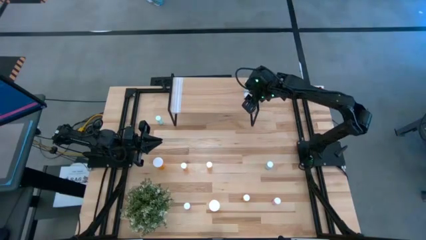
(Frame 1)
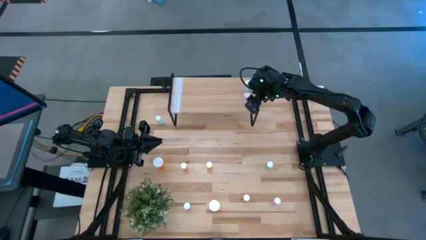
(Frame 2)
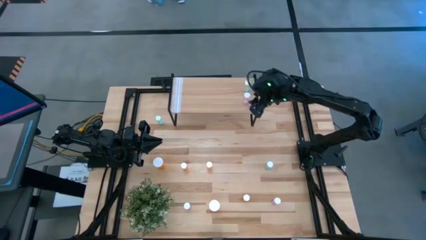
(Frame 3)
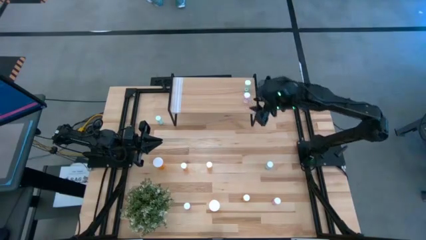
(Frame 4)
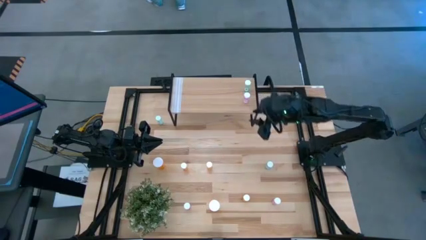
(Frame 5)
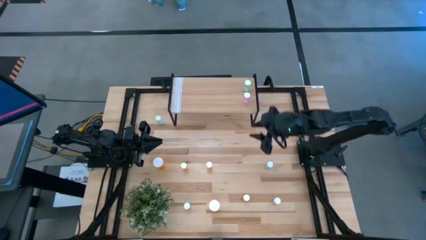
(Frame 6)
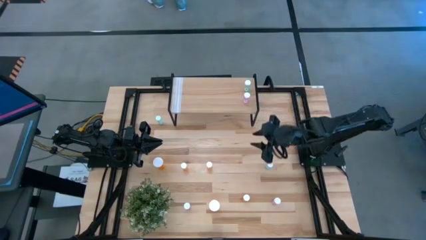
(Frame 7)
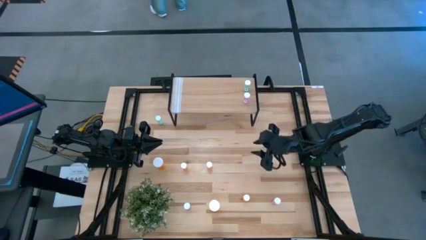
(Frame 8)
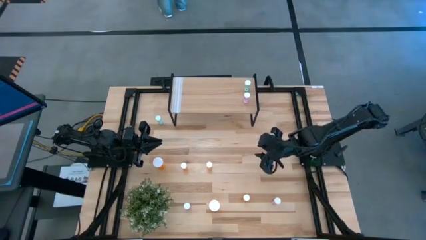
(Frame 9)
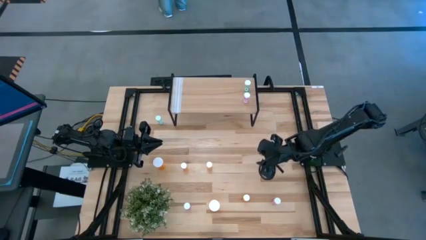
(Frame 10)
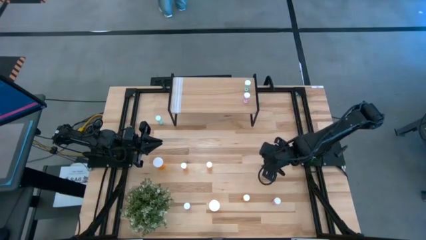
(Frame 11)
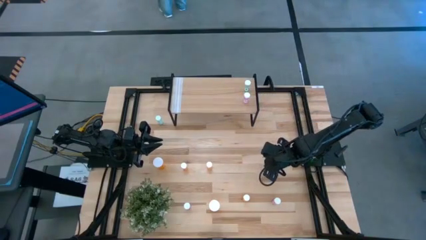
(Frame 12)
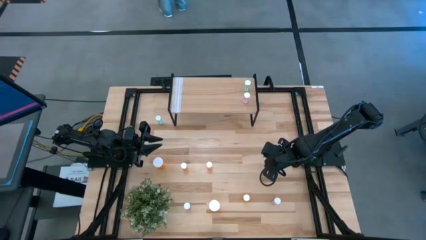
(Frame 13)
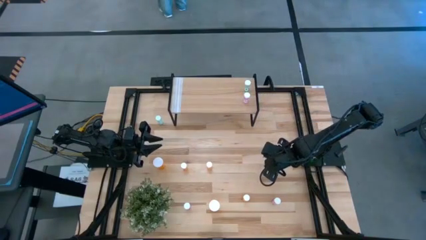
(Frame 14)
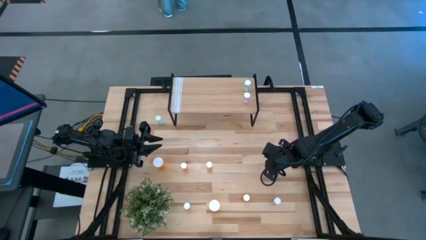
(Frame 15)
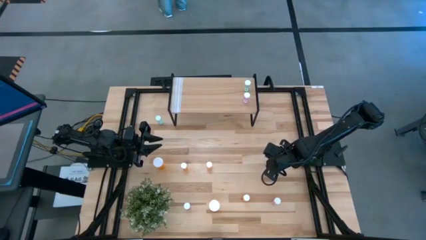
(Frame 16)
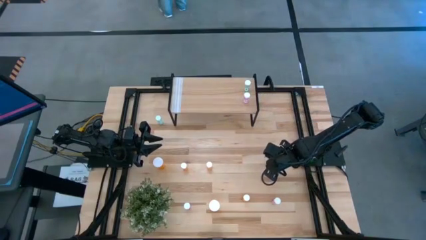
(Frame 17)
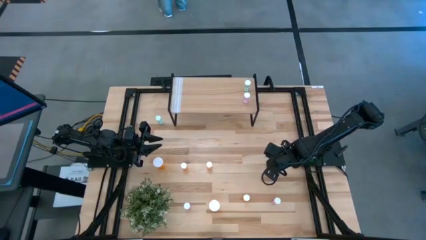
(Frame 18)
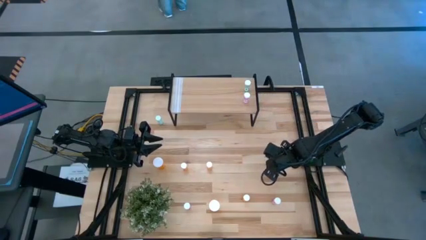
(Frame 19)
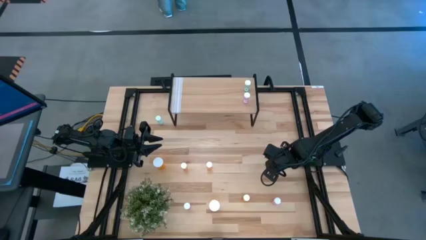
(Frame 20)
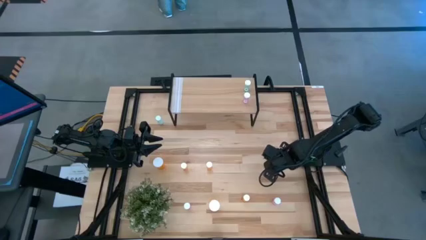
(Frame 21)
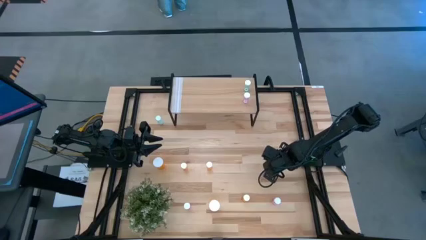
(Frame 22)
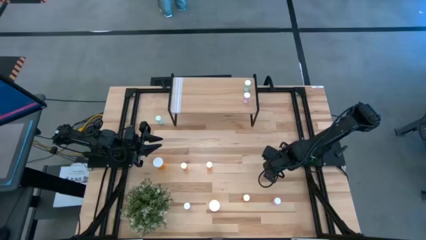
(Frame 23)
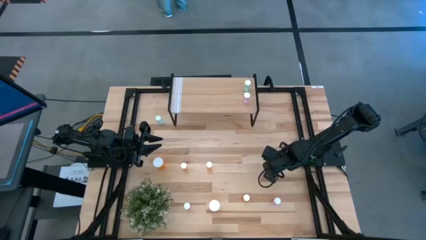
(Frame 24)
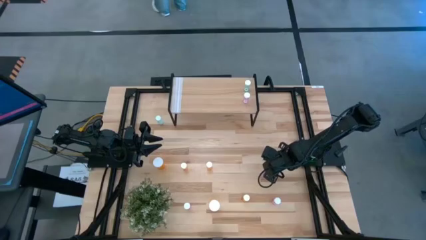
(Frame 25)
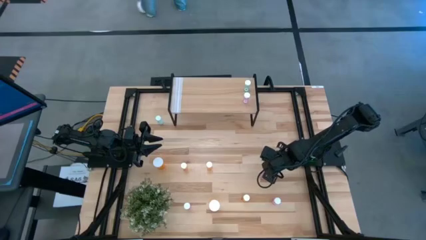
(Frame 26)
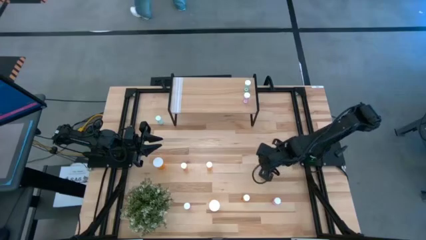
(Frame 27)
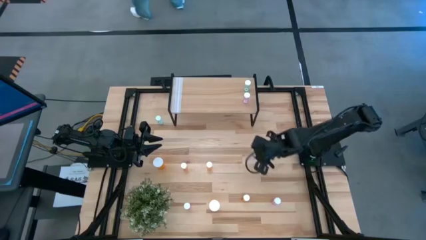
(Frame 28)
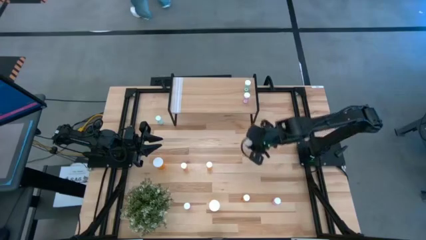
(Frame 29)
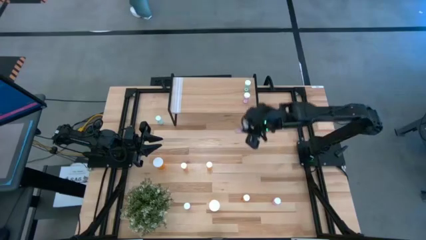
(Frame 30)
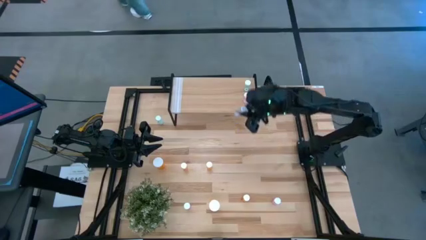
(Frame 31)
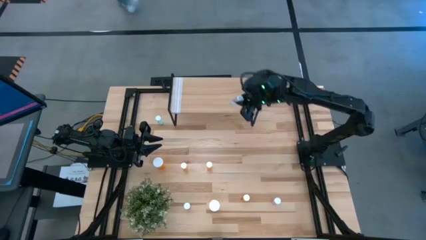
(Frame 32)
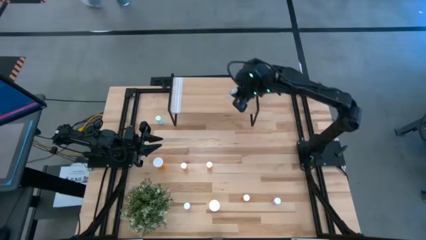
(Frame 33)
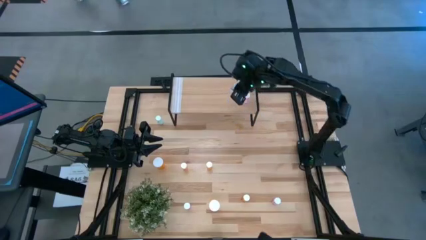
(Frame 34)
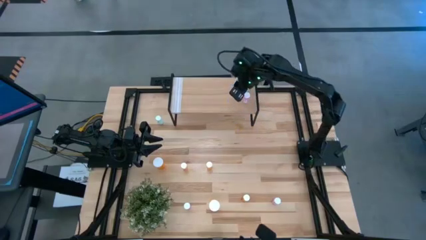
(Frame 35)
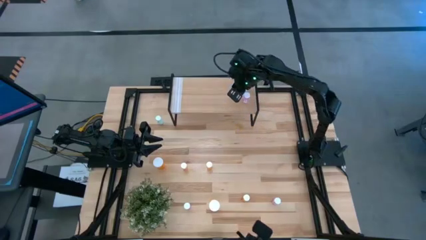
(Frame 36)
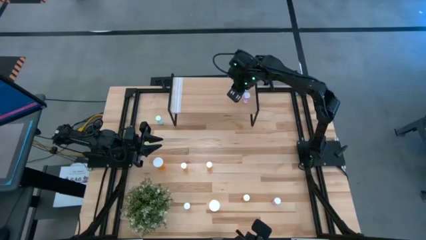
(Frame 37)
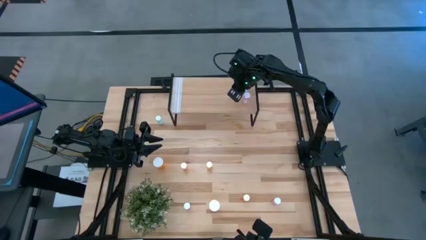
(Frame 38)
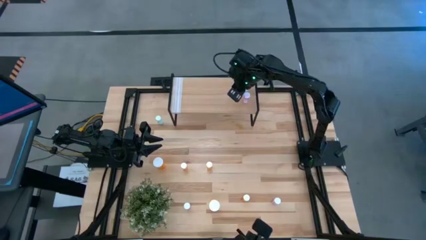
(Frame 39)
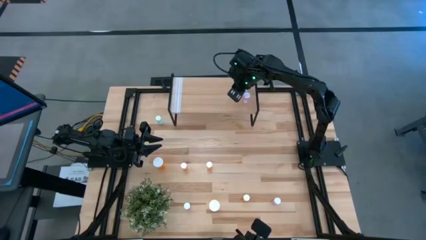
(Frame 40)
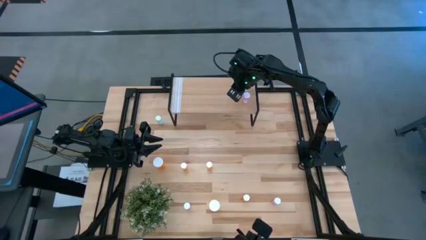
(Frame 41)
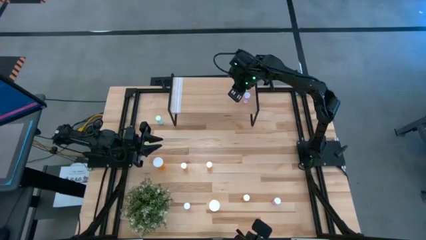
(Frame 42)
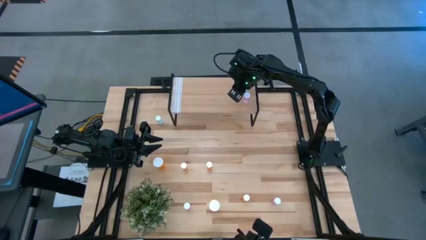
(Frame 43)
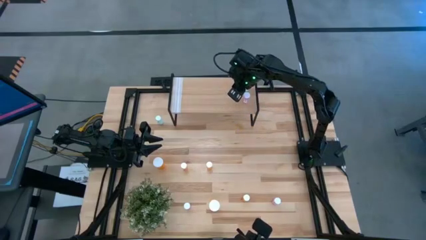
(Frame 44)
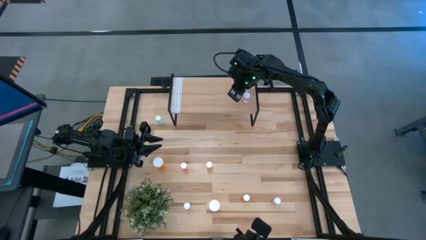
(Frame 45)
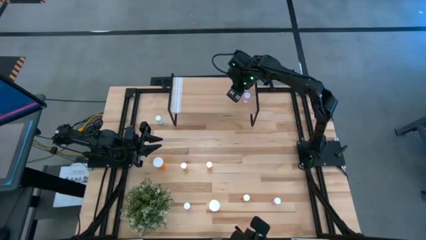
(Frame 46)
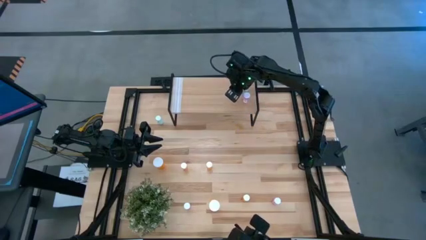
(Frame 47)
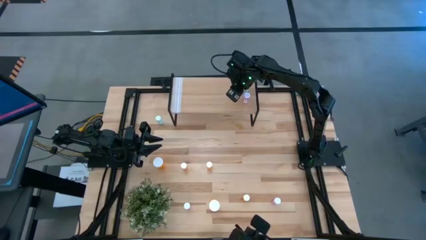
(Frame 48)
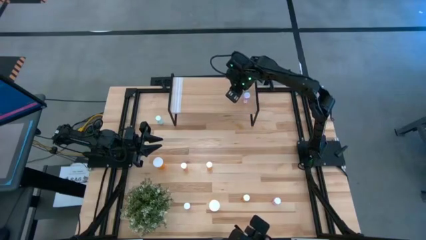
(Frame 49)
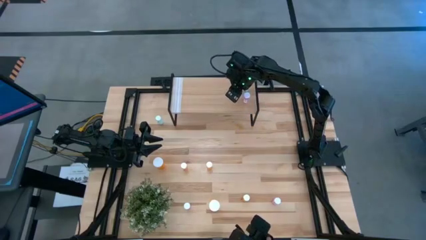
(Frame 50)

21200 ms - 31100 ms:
Task: Pick and place medicine bottles onto shelf by color
Put the right blue bottle on the shelf

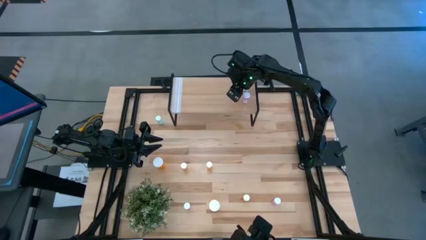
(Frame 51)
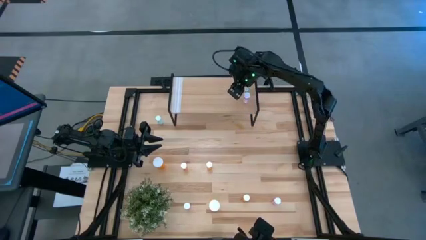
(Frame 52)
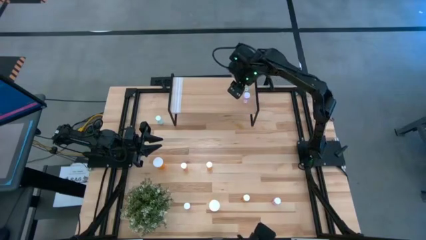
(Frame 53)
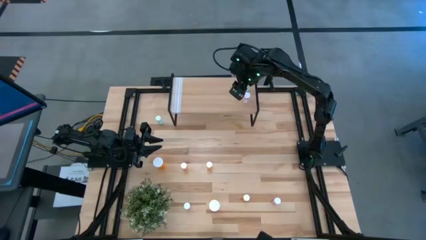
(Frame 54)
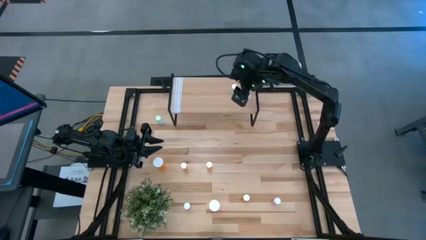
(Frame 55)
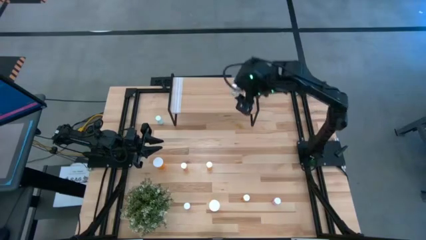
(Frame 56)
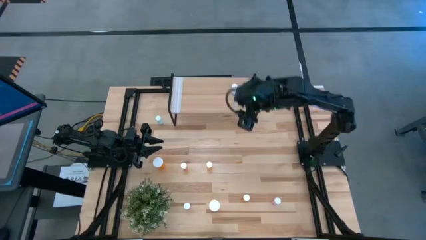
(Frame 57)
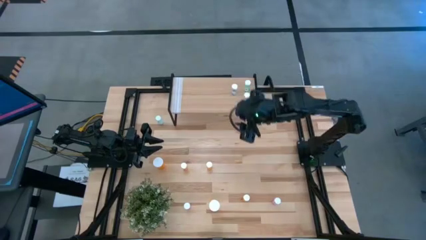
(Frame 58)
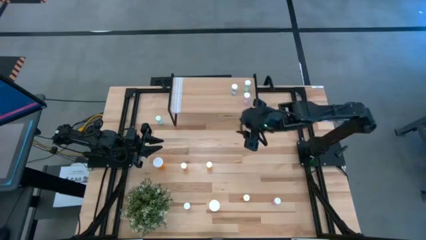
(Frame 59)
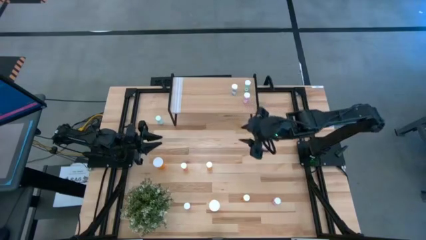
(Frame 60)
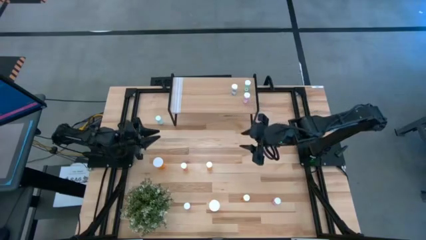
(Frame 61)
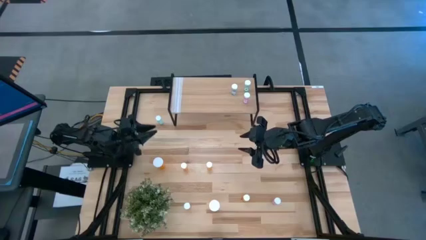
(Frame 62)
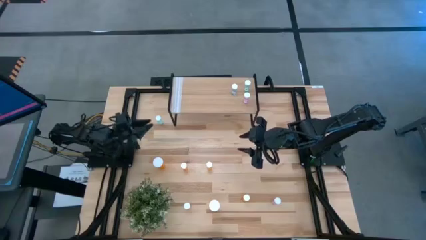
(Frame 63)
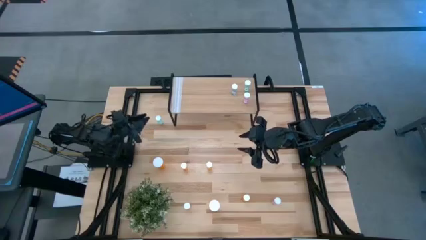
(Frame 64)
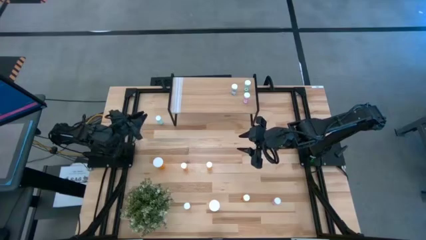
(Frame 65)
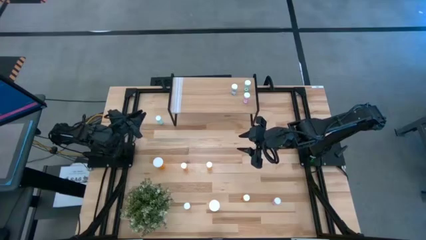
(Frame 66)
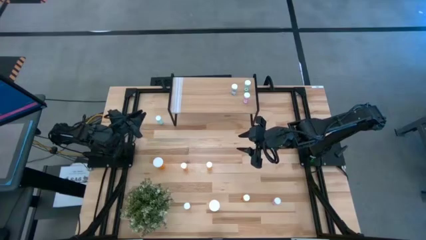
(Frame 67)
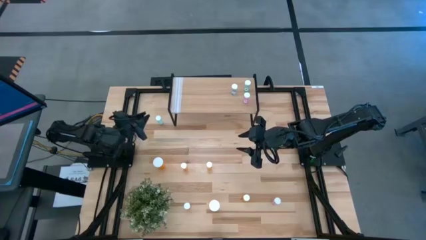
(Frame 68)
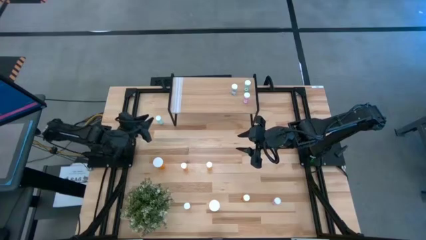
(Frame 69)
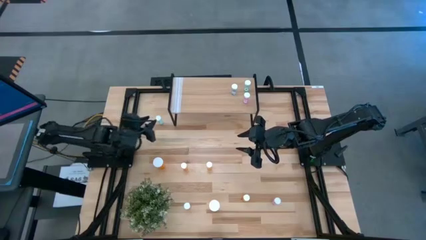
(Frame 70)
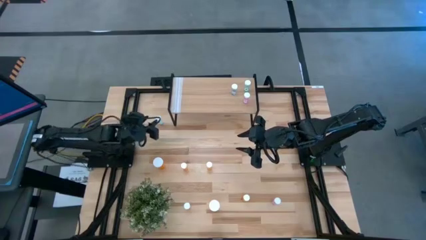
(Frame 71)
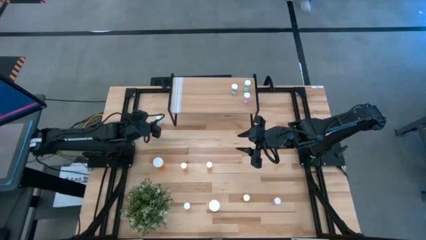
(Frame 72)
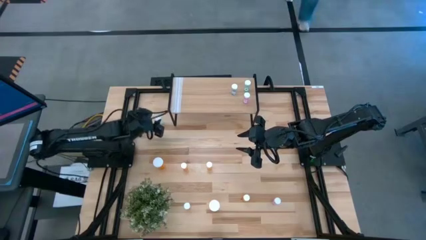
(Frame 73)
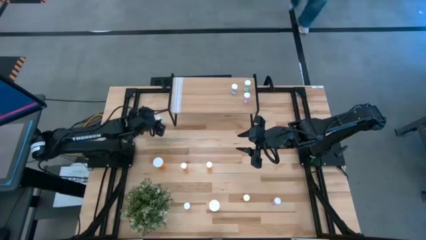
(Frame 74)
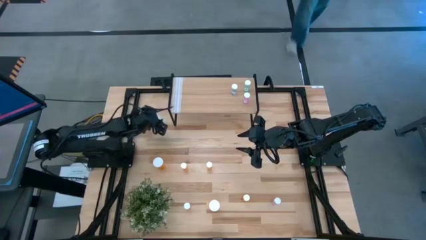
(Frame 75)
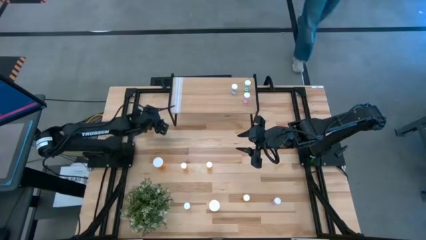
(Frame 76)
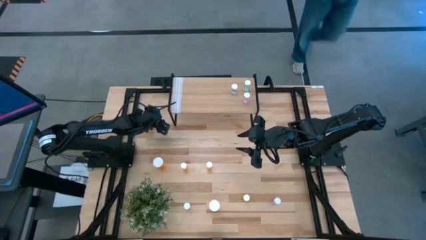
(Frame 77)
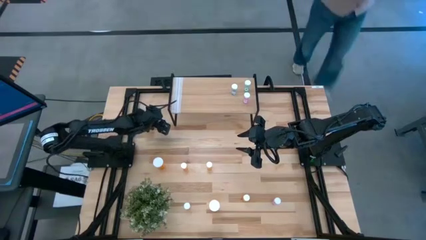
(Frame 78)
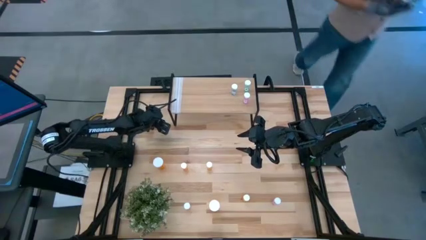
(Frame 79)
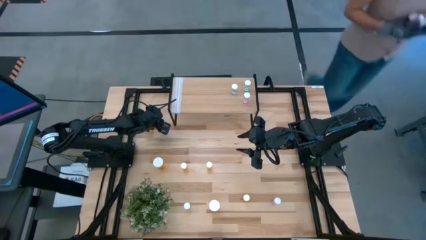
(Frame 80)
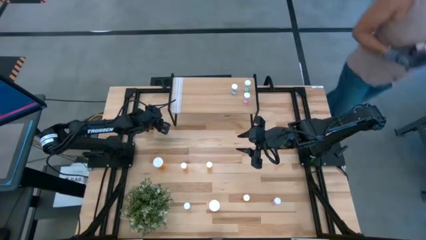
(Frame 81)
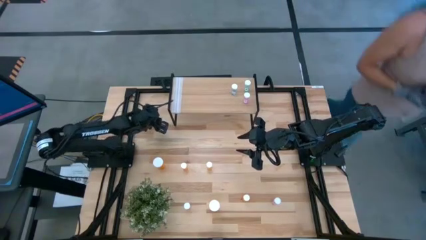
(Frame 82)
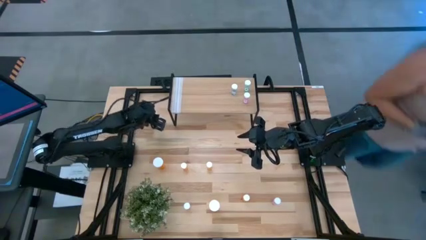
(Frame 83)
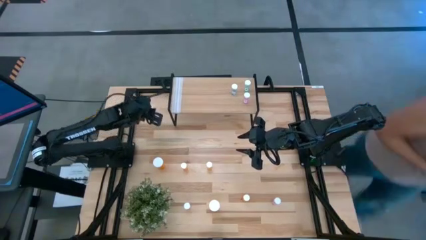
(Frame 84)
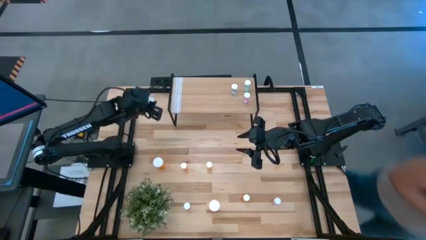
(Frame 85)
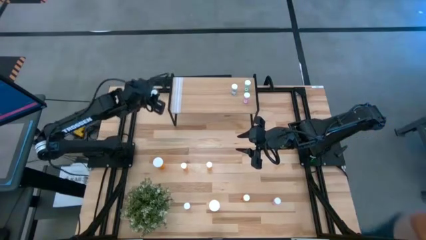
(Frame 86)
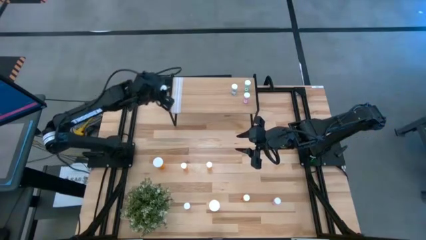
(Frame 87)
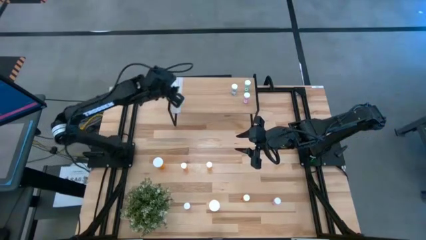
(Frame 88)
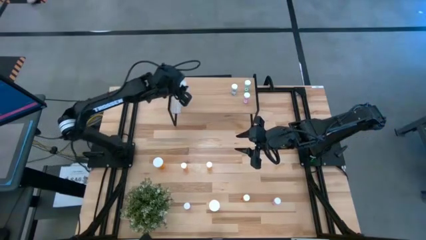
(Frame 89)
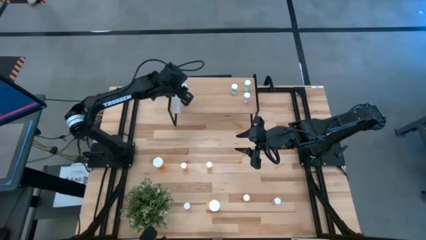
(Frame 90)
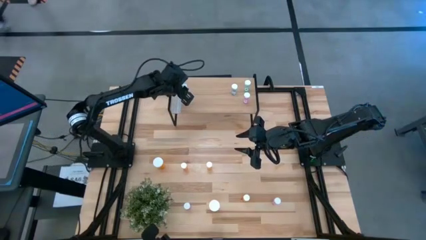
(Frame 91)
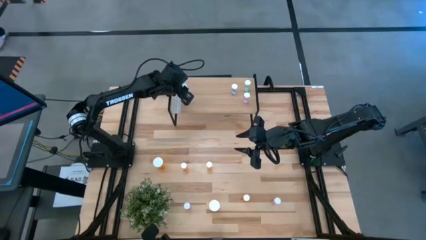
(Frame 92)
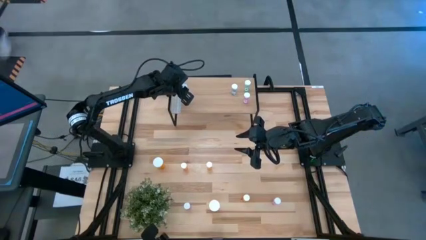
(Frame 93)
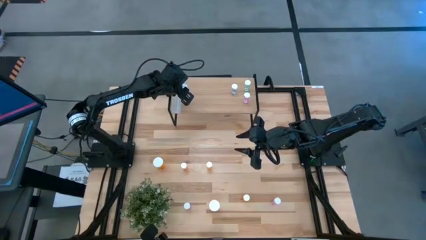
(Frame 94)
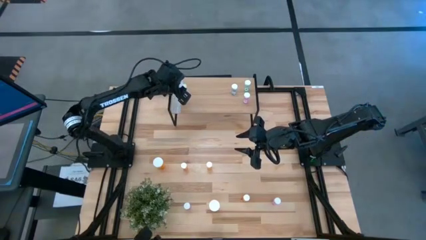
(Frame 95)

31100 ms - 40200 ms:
Put the blue bottle on the shelf
